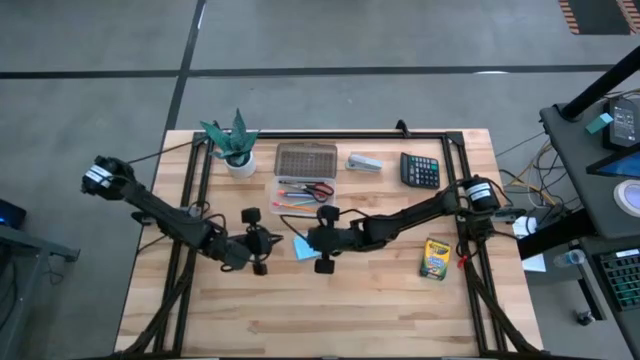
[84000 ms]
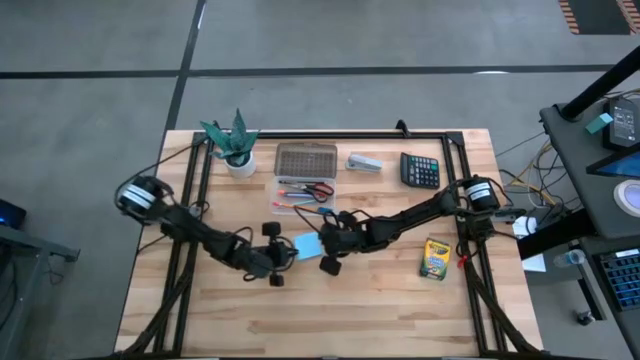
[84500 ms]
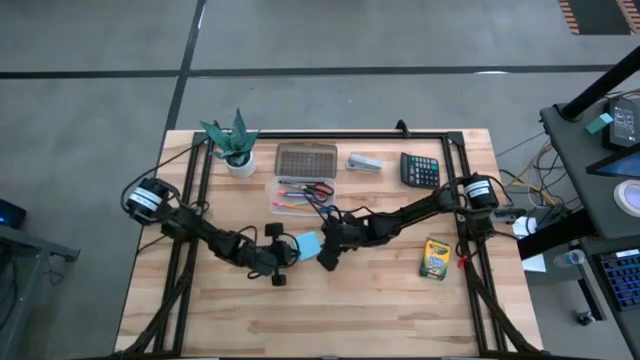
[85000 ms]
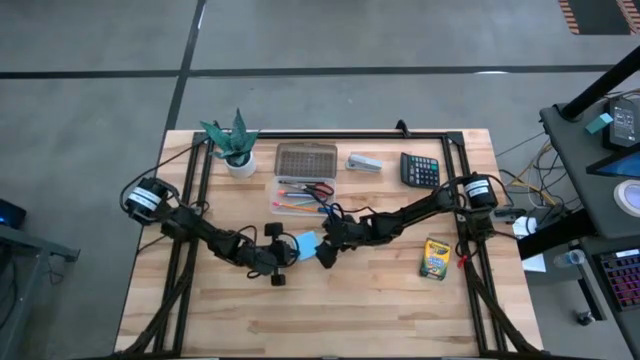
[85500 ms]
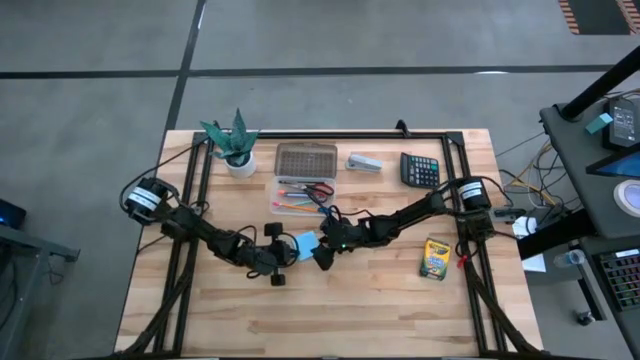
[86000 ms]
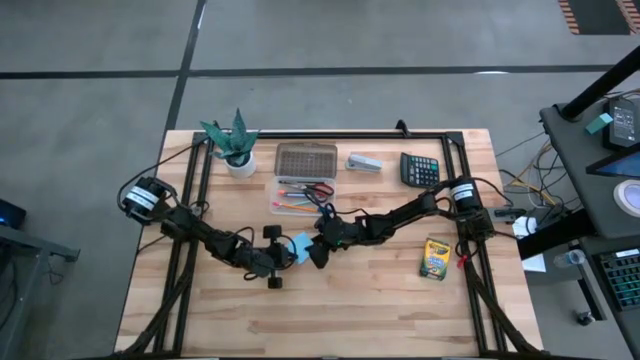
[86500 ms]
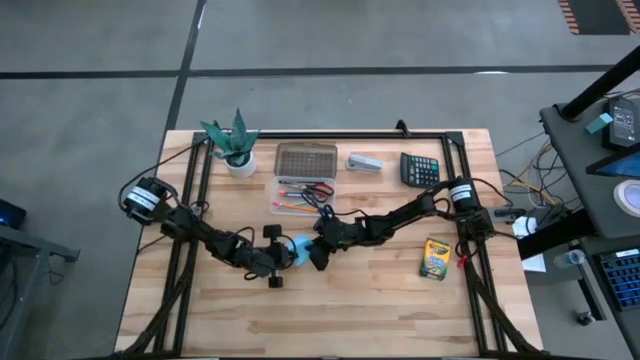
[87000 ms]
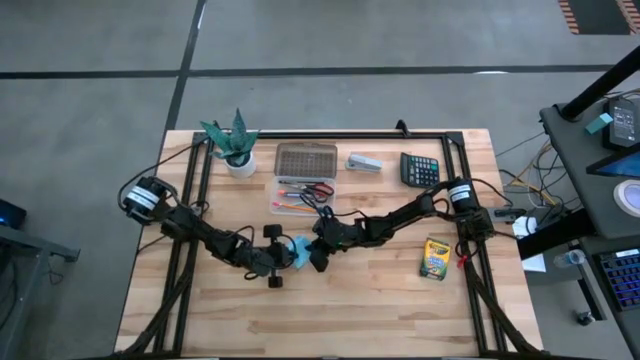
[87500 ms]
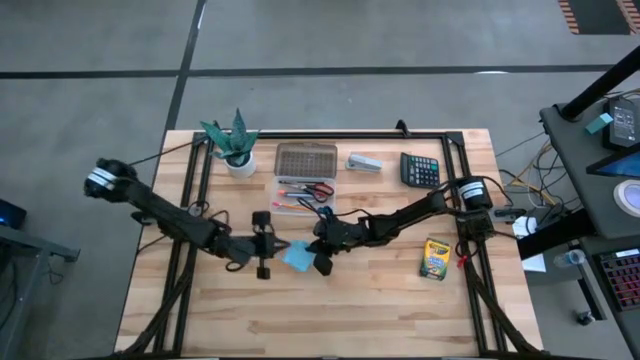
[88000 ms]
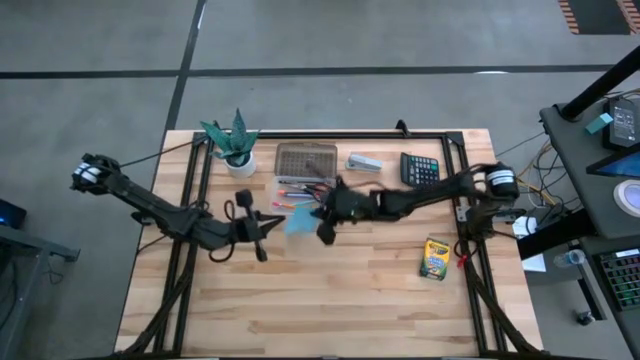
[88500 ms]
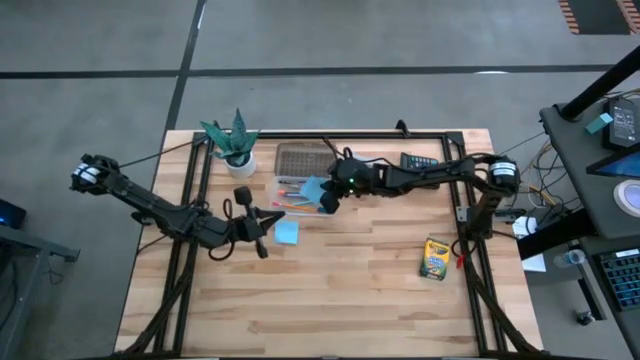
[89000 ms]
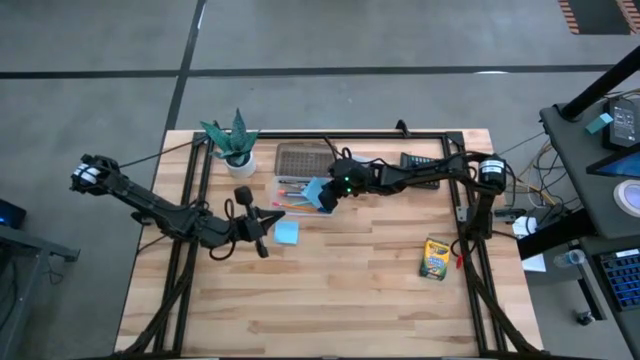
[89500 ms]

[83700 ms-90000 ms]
Task: Pack school essentials
Put the blue sticky notes into the supply box

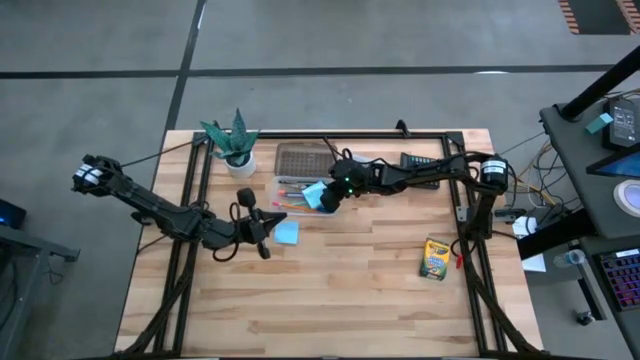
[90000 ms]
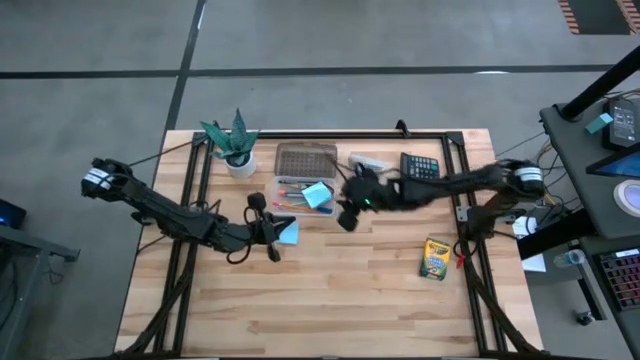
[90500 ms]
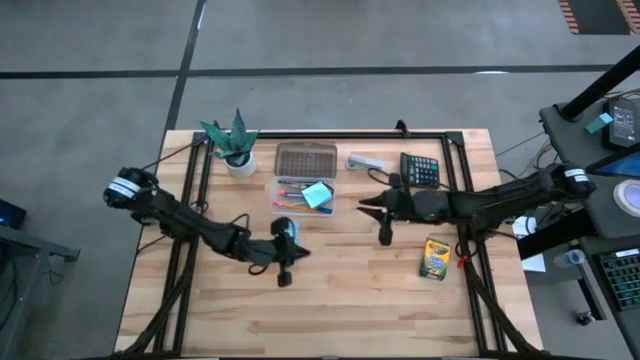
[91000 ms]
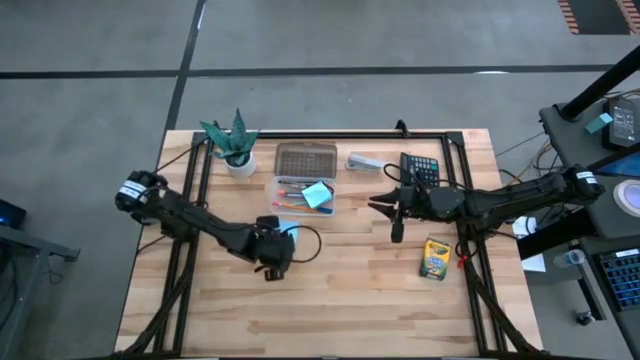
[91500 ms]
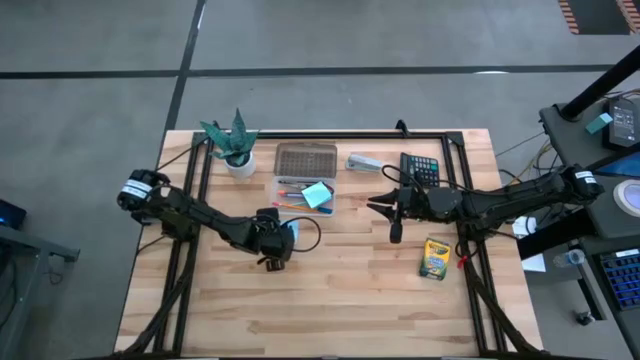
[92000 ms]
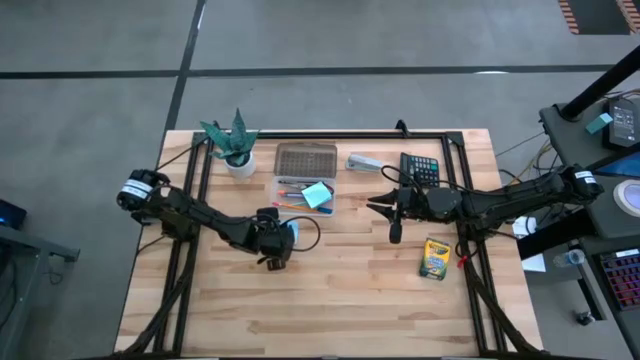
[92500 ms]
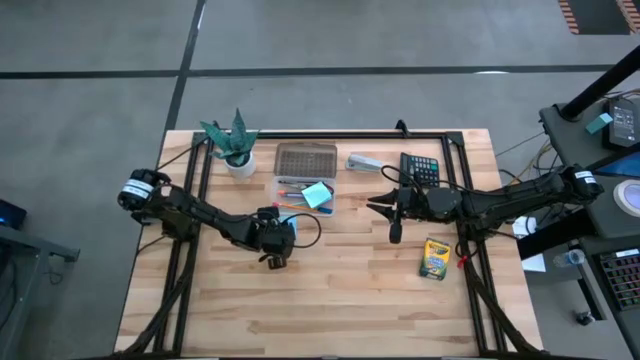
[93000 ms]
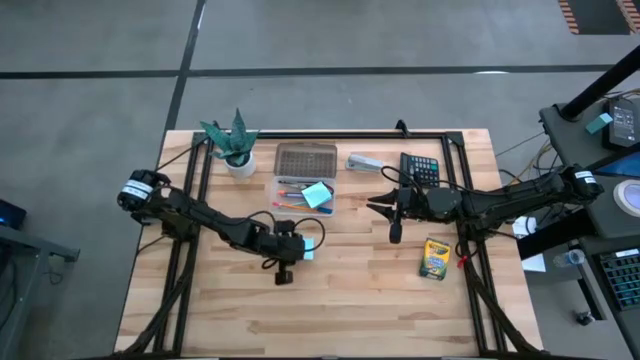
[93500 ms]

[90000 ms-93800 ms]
Put the blue sticky note into the supply box

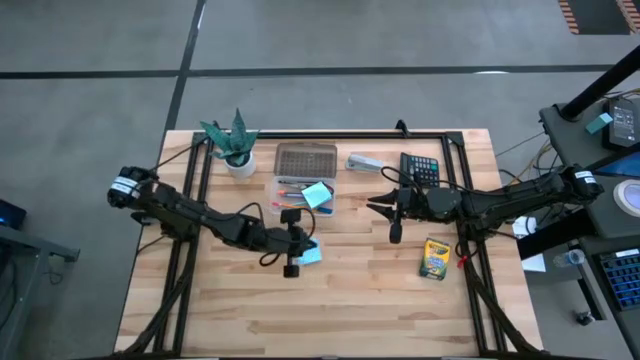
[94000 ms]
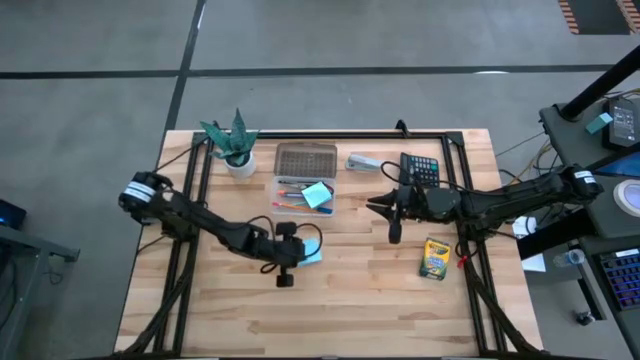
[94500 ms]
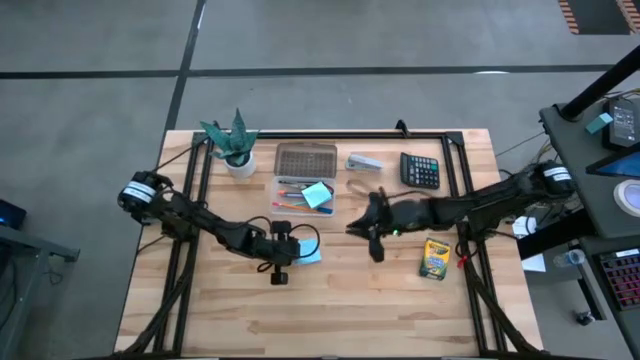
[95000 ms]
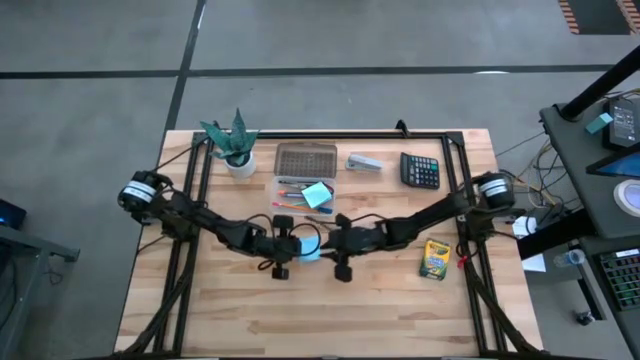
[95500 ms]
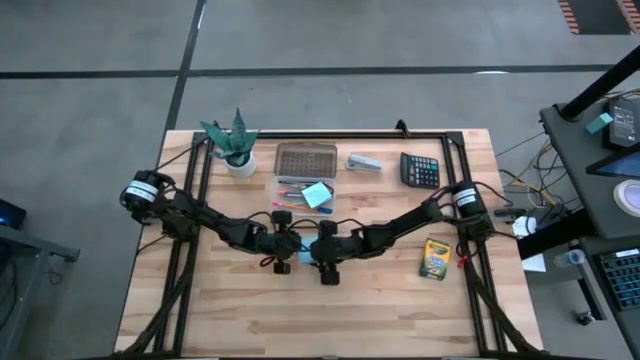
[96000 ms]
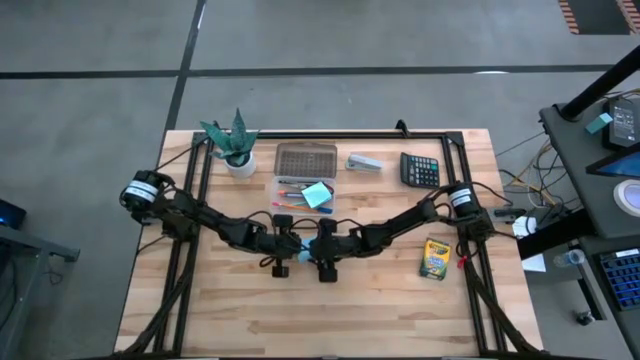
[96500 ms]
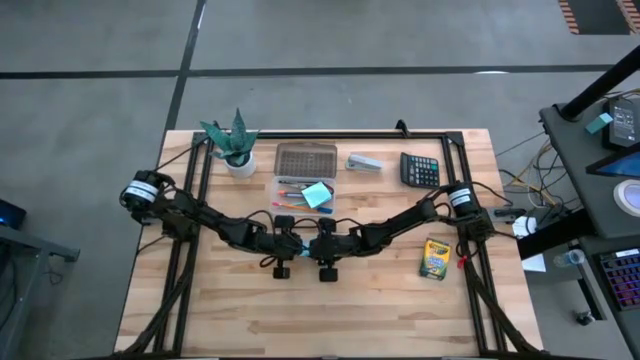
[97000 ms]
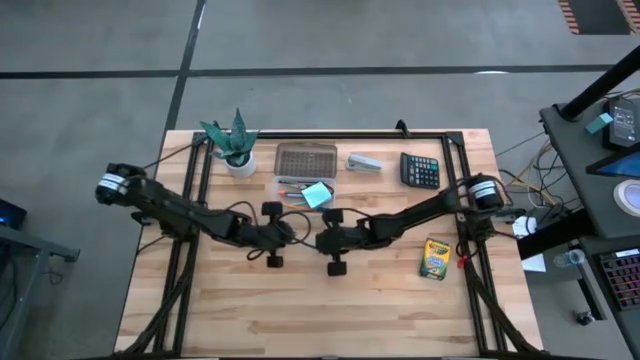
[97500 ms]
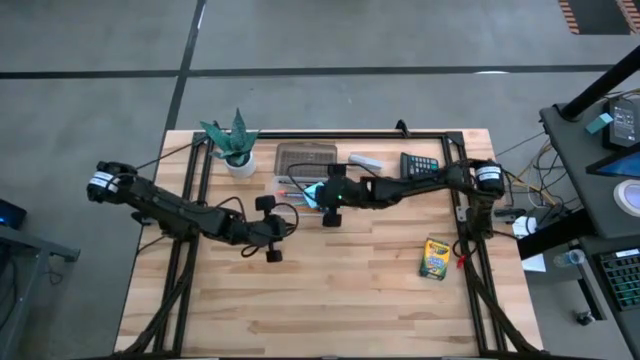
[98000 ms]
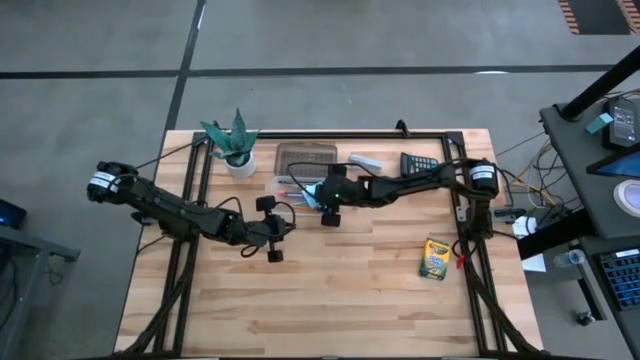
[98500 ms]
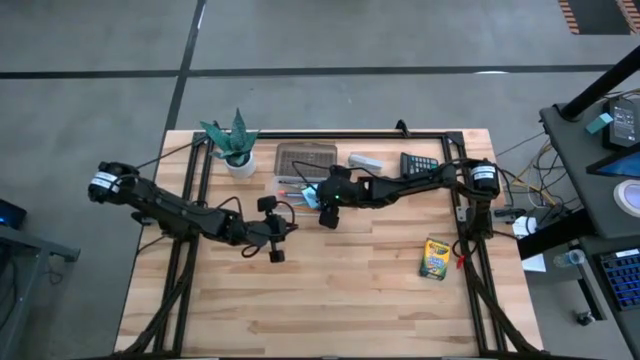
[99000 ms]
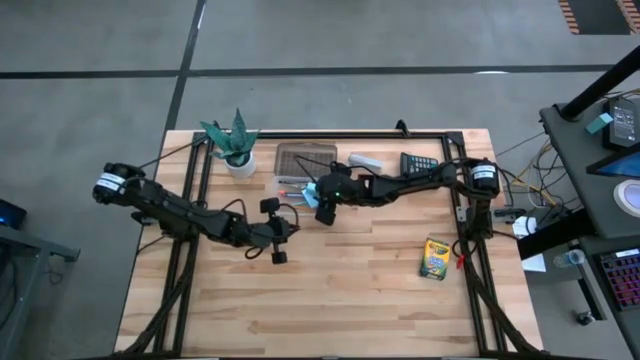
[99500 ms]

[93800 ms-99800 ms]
Put the blue sticky note into the supply box

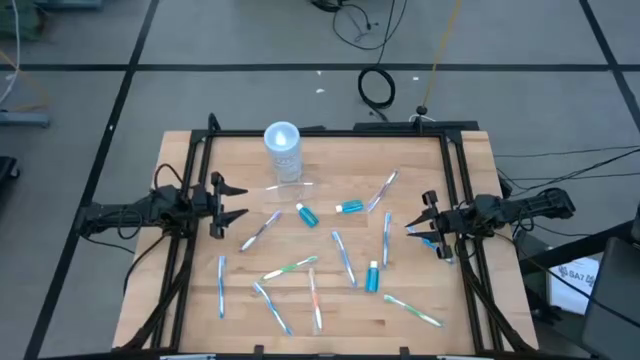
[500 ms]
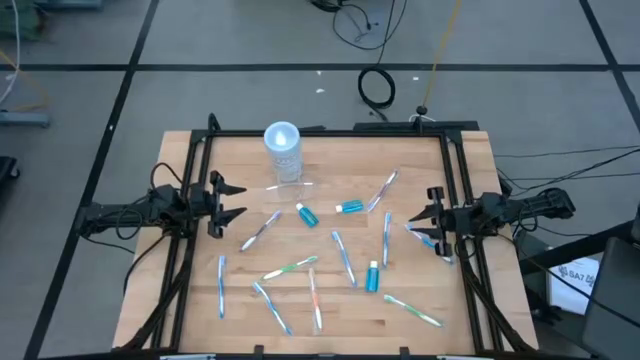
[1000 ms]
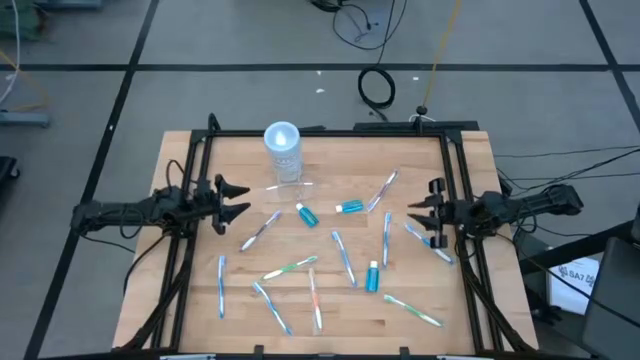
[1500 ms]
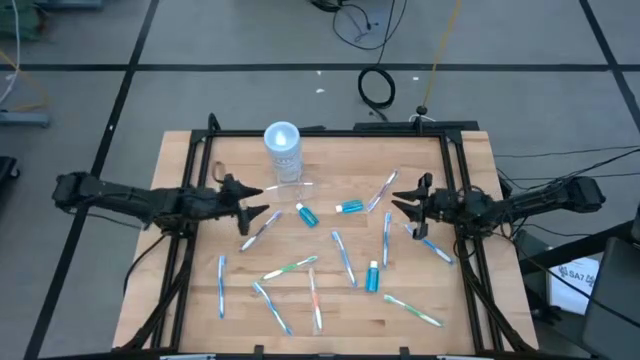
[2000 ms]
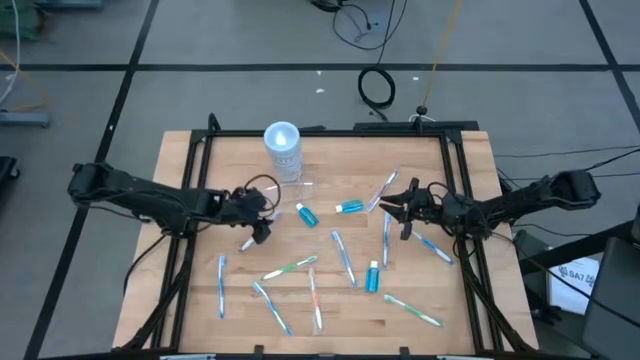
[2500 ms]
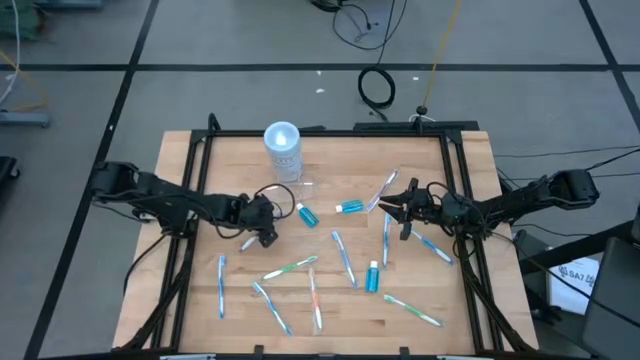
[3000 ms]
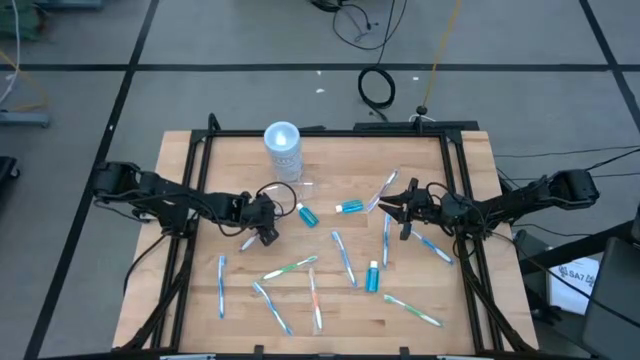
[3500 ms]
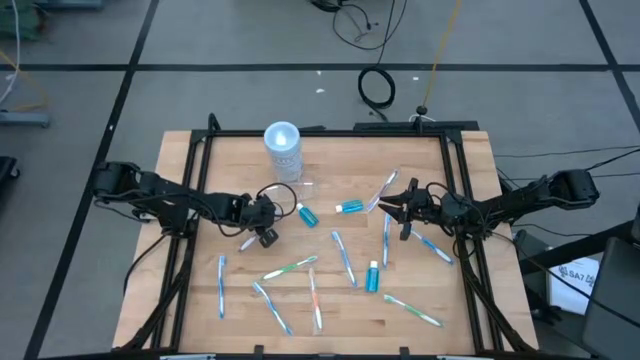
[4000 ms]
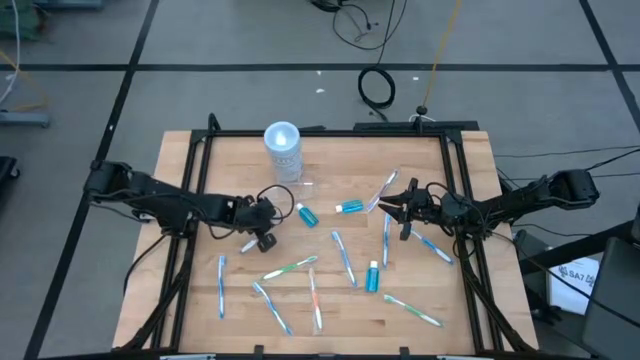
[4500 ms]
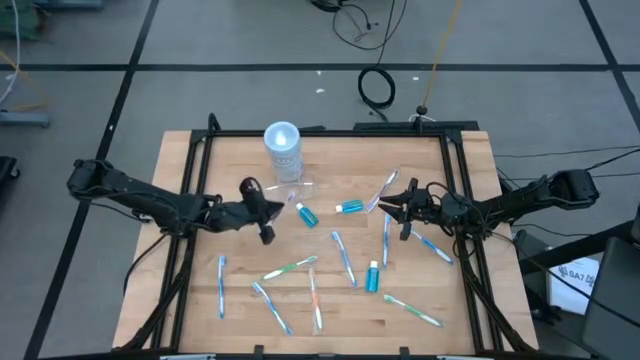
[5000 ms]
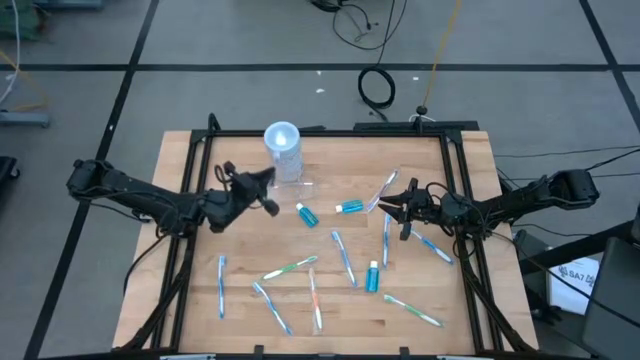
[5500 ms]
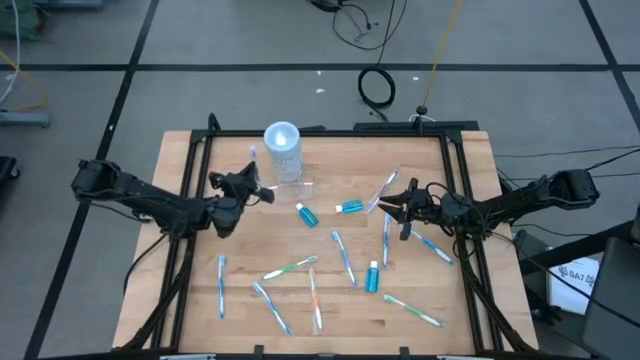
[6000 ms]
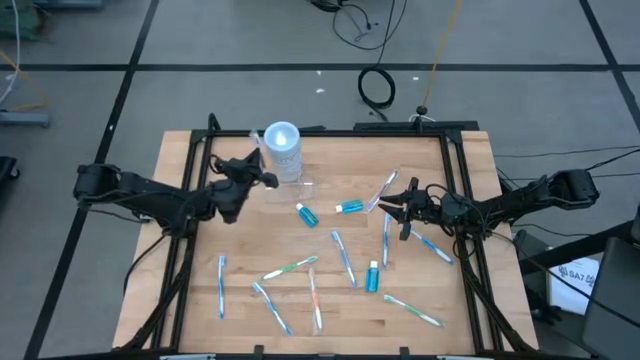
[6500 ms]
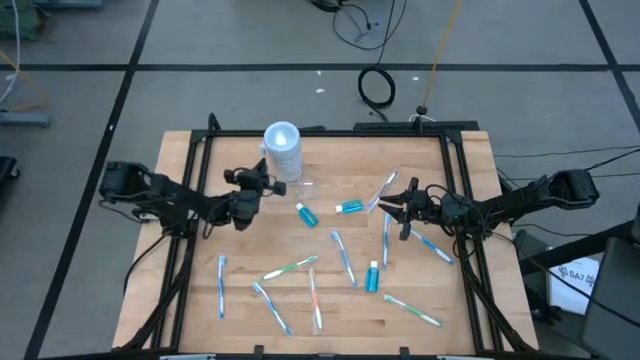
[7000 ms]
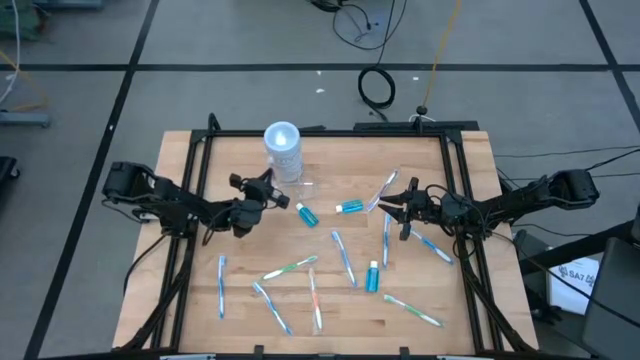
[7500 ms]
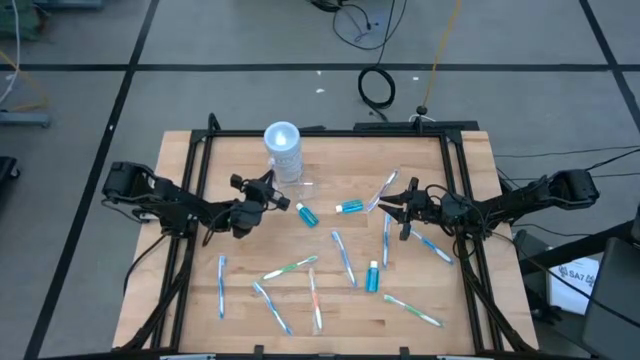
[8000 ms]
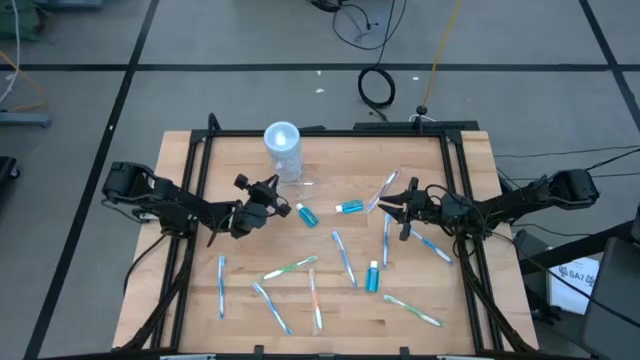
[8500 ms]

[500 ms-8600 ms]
Task: Pick & Place toothbrushing station
Put the left purple toothbrush into the transparent organizer
